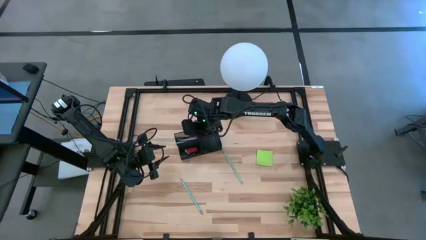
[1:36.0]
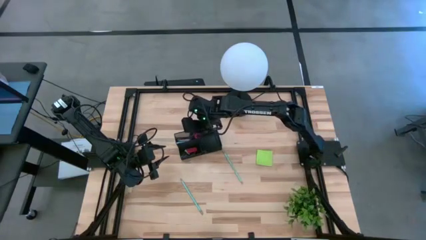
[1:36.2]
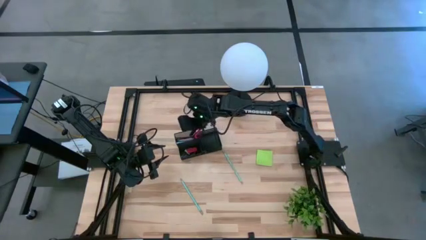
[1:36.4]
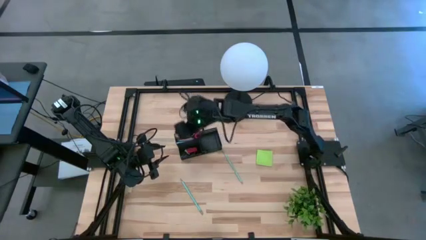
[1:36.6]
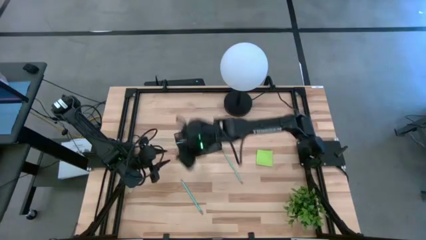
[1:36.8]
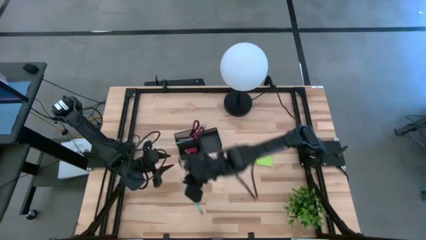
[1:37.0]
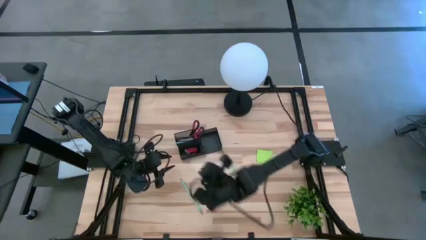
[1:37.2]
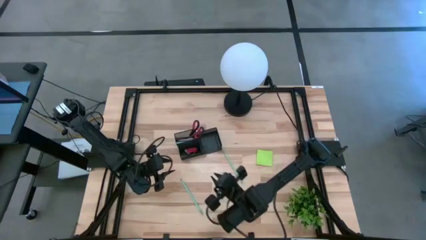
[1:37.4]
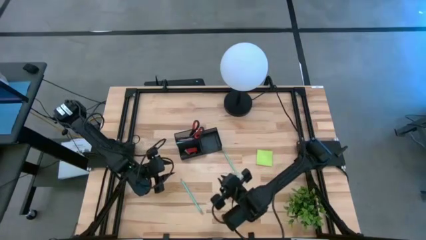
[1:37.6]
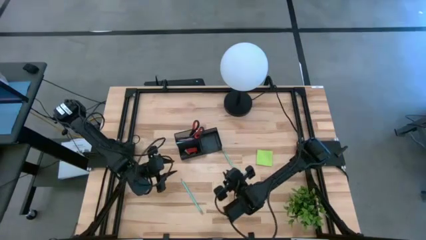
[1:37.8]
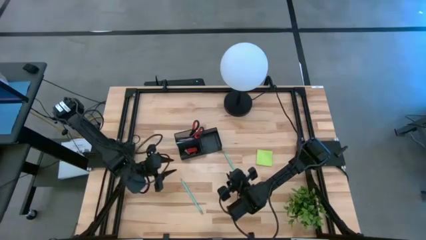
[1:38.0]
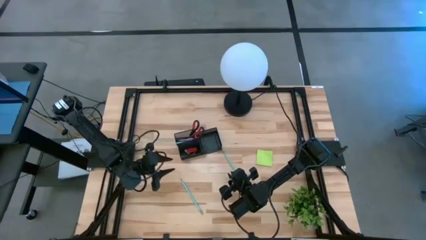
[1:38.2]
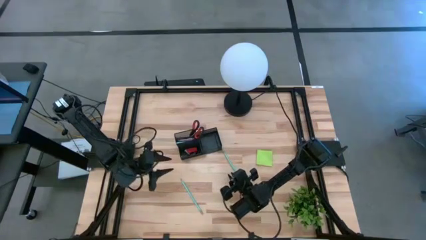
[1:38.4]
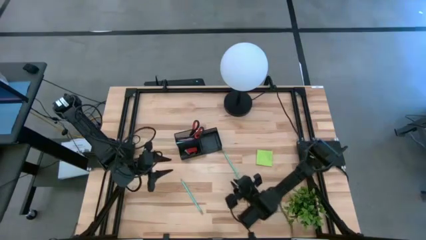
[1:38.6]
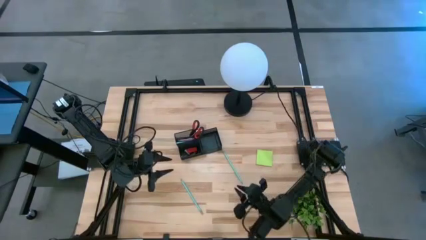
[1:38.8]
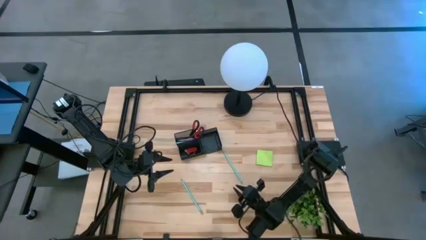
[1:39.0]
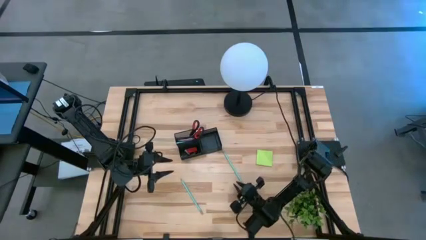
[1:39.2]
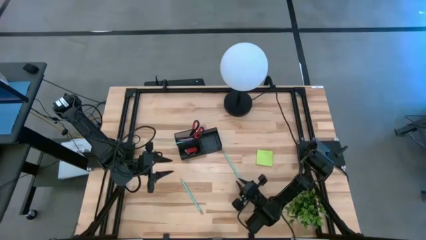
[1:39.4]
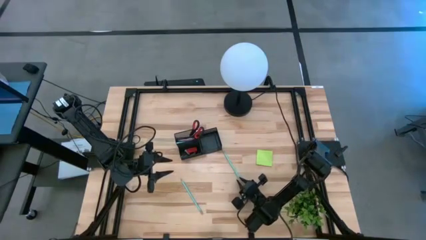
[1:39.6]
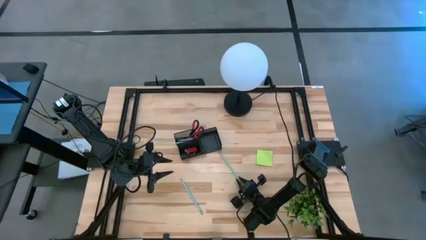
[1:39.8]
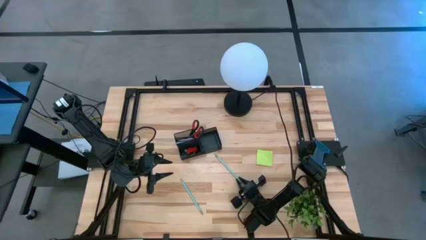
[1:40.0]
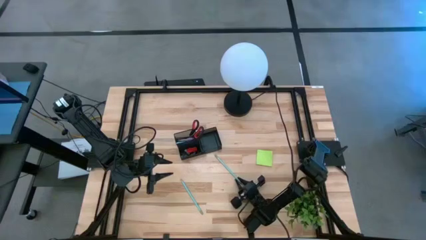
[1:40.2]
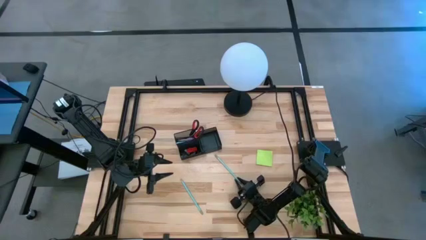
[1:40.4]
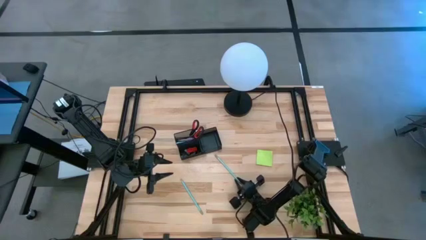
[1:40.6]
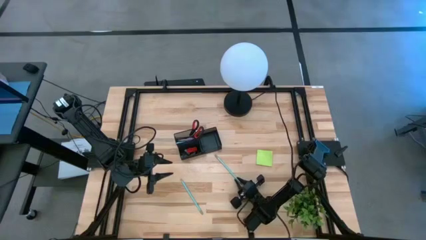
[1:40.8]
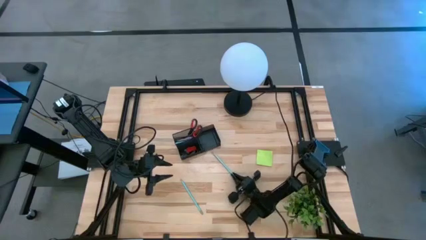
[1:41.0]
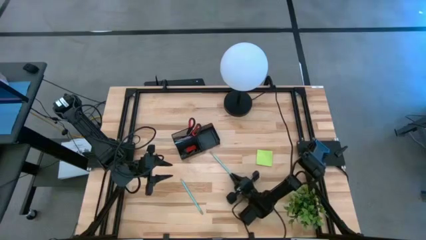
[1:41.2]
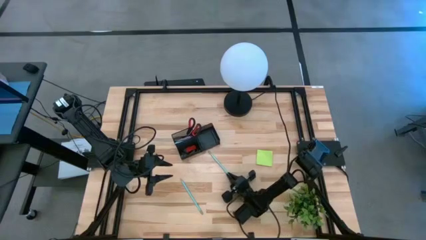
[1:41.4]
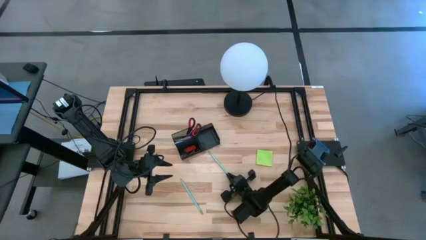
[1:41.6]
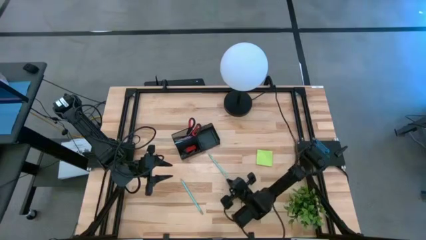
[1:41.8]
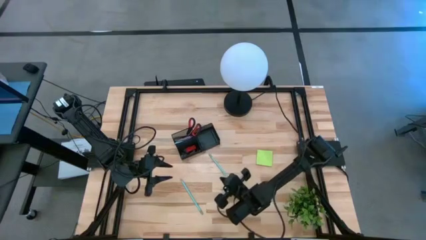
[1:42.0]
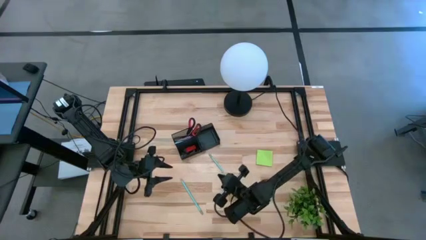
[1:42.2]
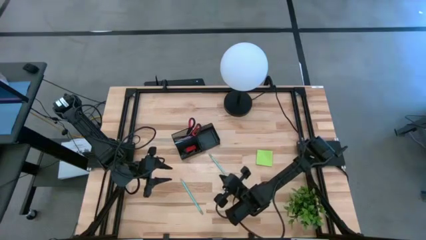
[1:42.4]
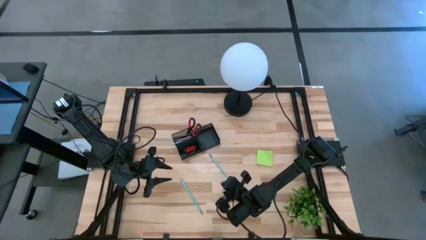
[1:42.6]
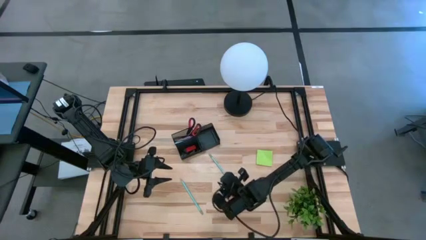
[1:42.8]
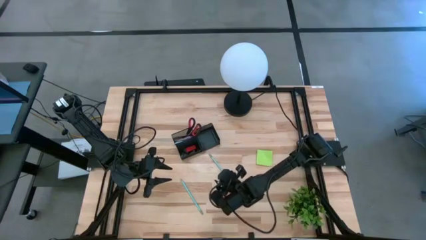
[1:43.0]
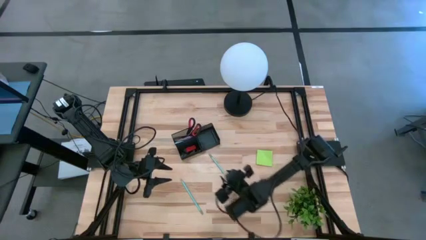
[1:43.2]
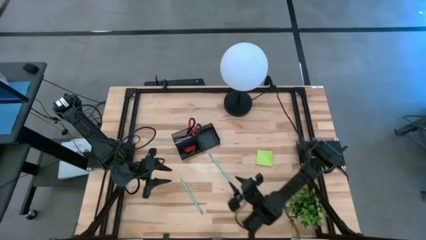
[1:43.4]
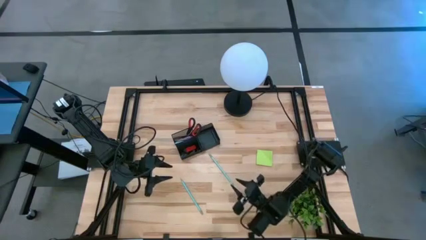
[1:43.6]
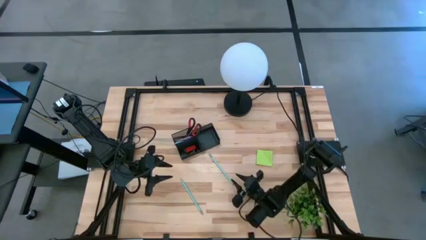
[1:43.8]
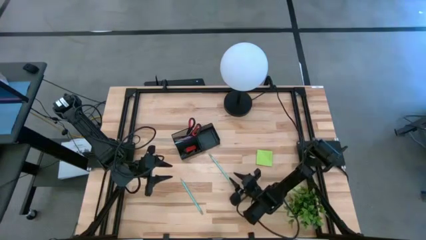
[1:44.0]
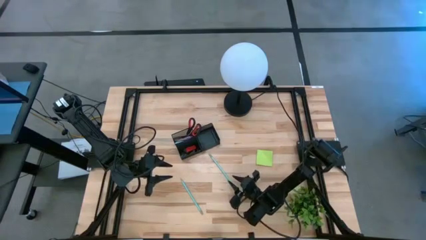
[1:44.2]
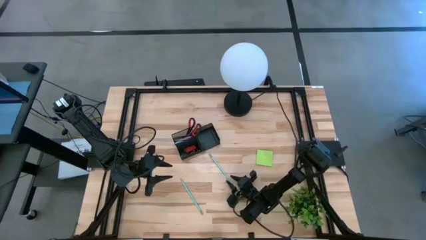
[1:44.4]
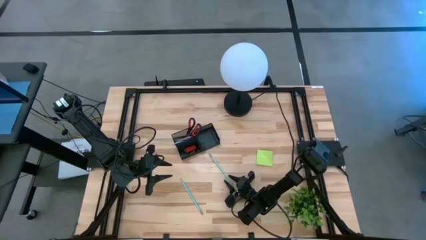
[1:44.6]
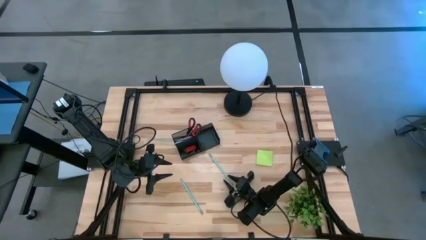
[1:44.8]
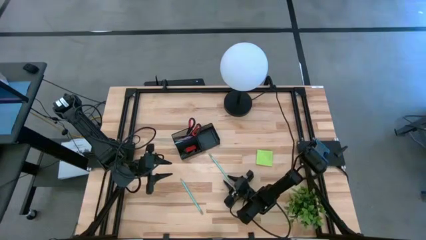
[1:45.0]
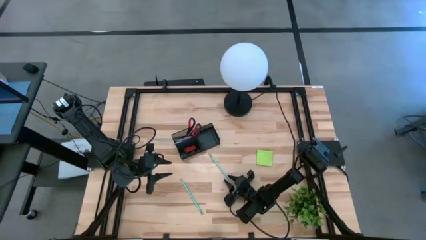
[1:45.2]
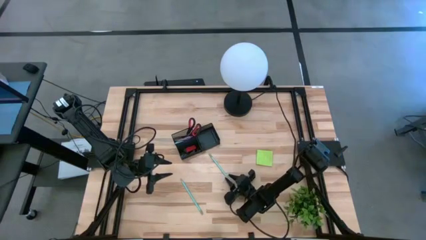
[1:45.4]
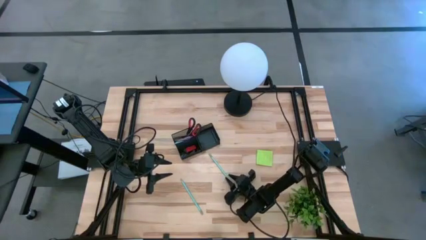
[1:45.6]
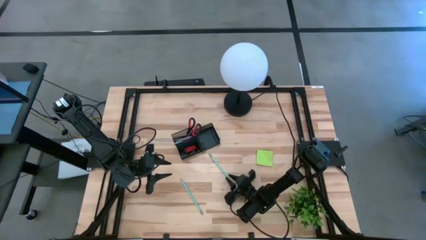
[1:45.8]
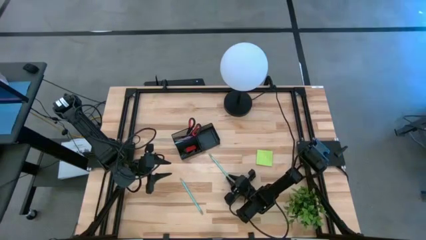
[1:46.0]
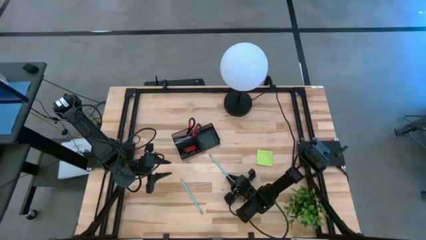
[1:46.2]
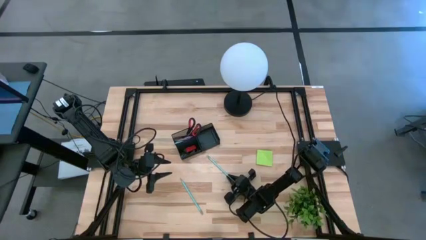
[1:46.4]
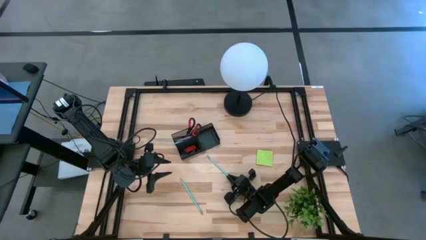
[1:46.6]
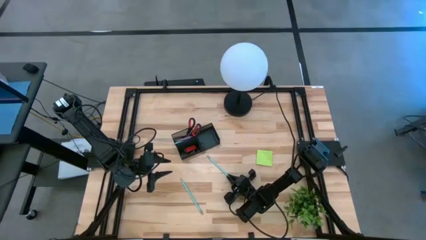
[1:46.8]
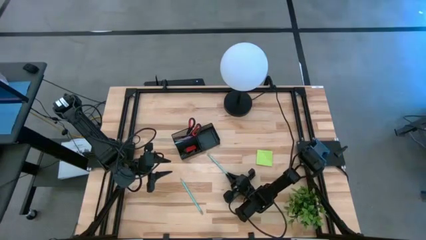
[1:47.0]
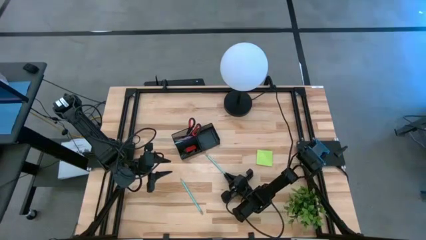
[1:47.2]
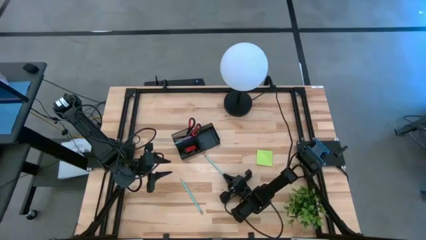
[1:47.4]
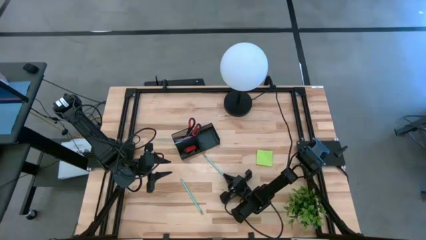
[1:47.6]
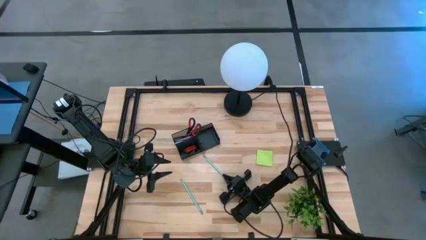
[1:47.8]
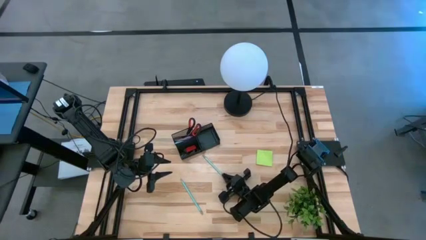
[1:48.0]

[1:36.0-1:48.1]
Task: Pick and place office supplies into organizer
Put the right blue pencil into the black desk organizer

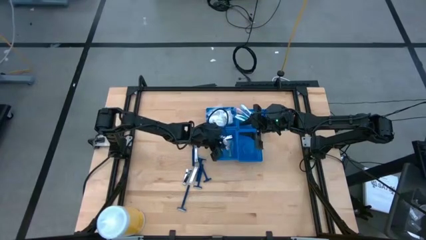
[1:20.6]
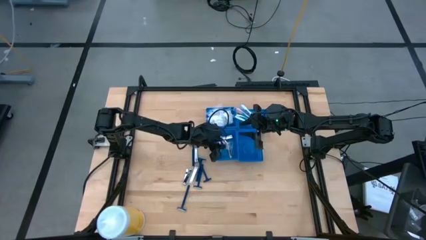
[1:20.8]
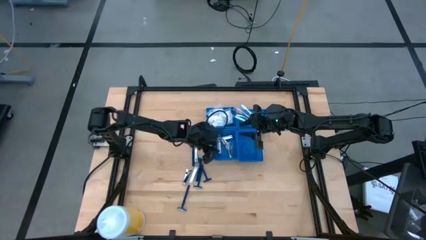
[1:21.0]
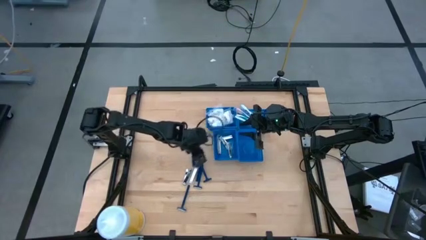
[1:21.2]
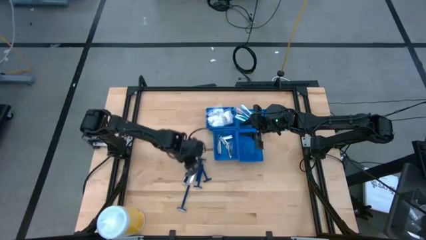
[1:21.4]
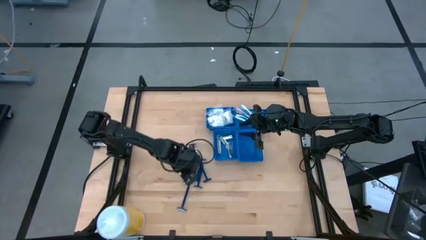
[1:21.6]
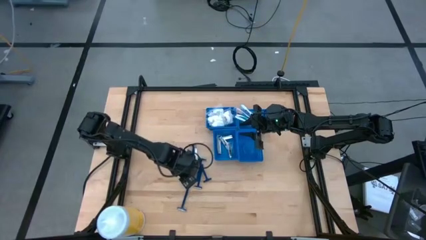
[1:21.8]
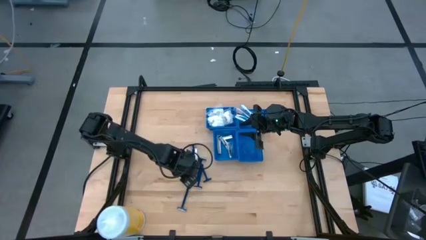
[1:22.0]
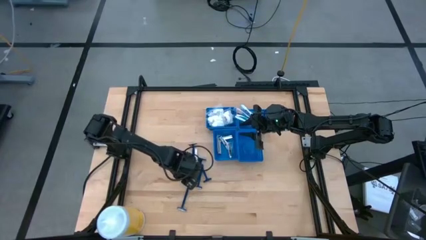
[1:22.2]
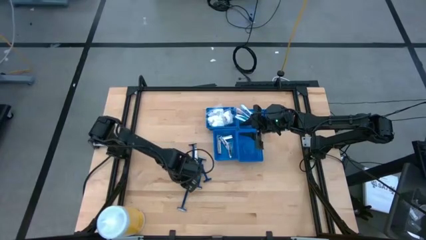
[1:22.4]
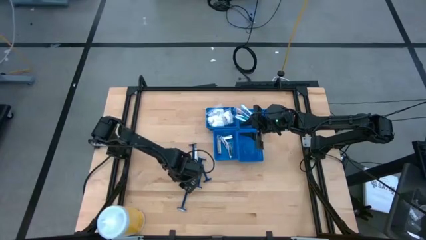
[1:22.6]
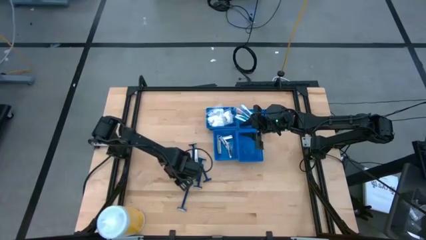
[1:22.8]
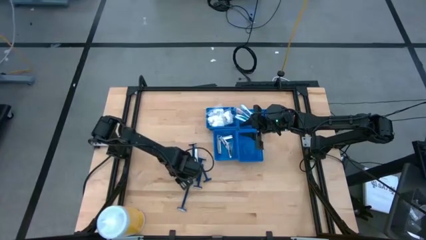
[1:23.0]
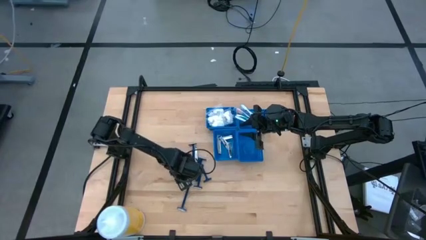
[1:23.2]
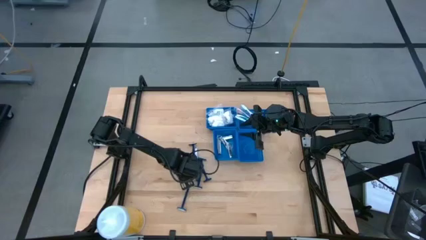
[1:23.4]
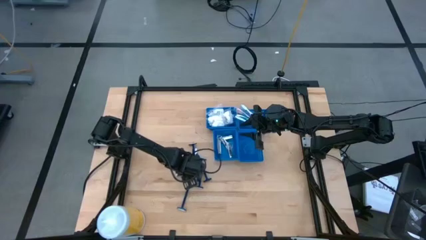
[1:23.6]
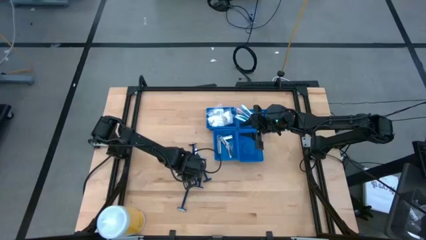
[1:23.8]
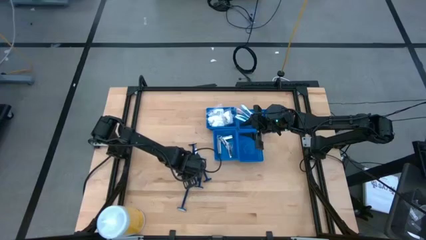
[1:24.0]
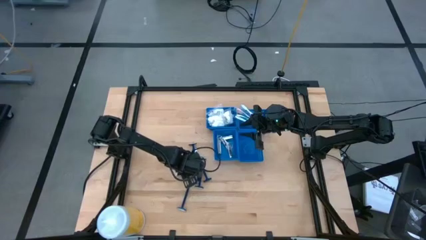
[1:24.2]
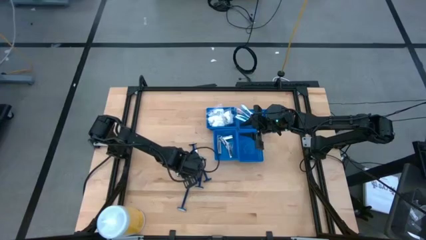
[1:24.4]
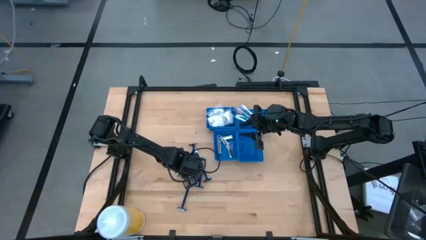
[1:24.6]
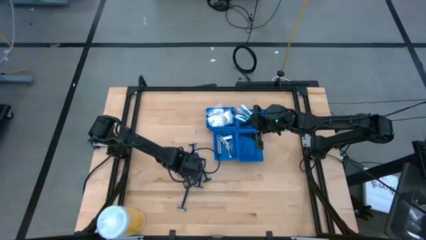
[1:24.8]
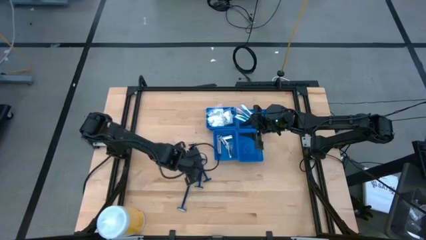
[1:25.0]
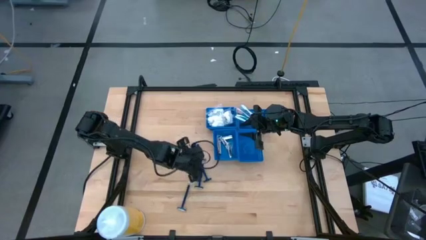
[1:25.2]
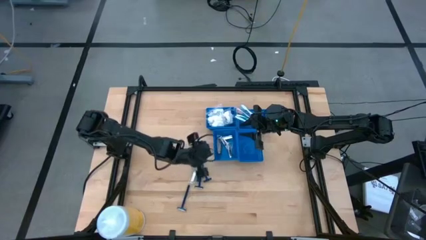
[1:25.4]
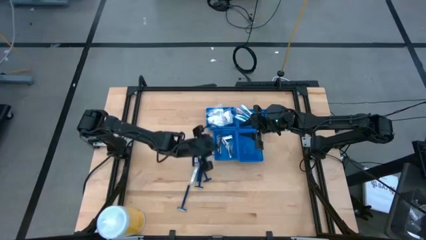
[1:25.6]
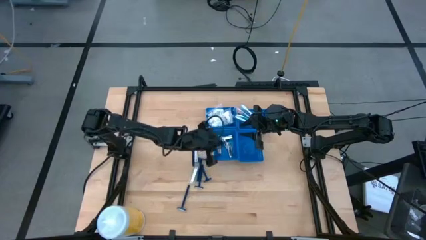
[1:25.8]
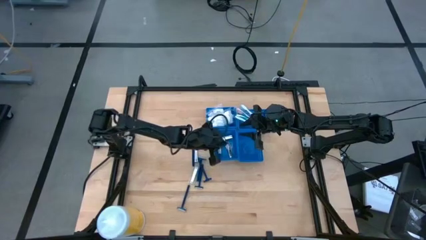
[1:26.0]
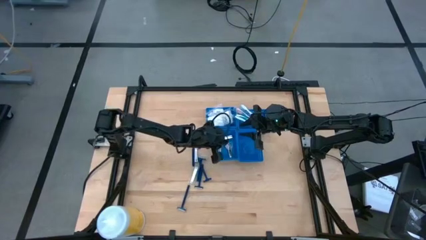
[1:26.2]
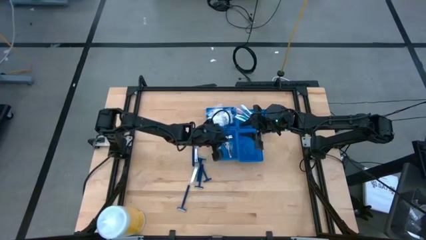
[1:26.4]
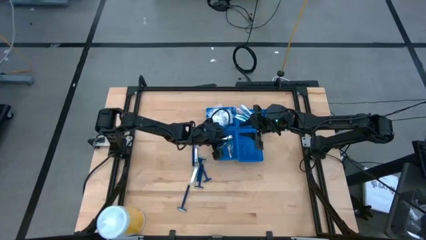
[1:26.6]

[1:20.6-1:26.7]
Task: Pick & Place Travel size toiletries
Put the silver nail cutter into the bottom left blue basket
